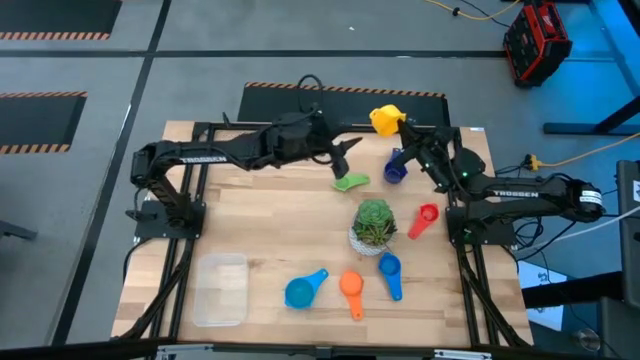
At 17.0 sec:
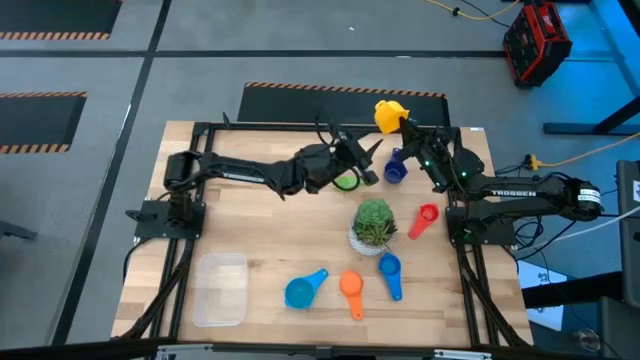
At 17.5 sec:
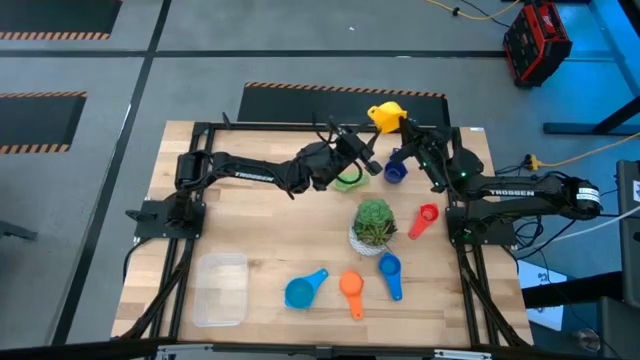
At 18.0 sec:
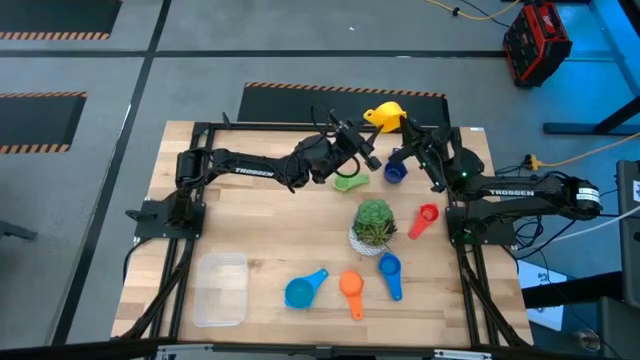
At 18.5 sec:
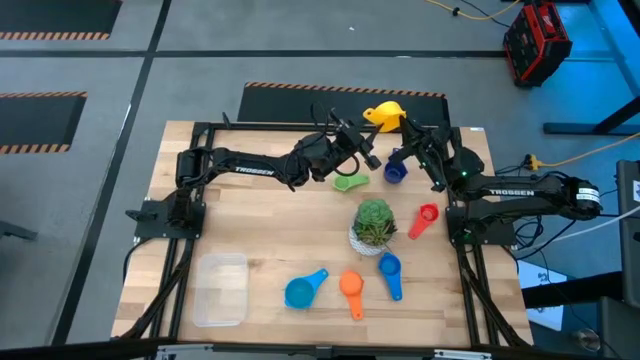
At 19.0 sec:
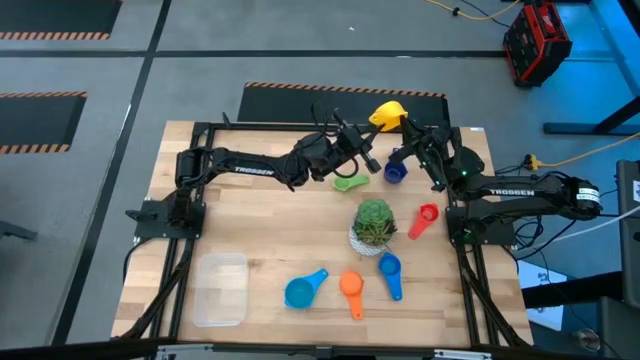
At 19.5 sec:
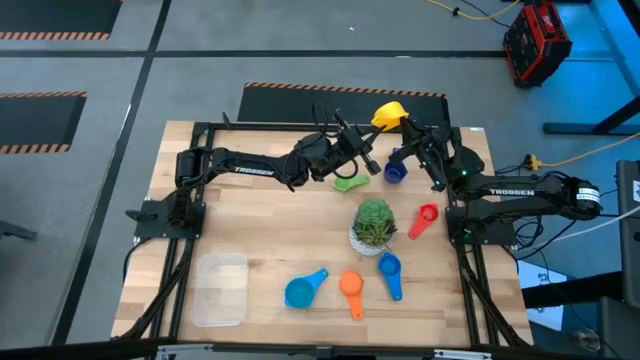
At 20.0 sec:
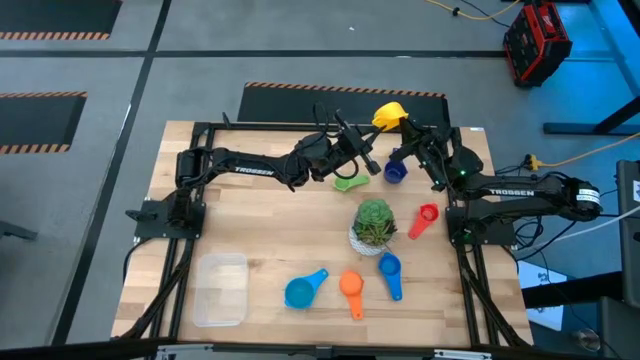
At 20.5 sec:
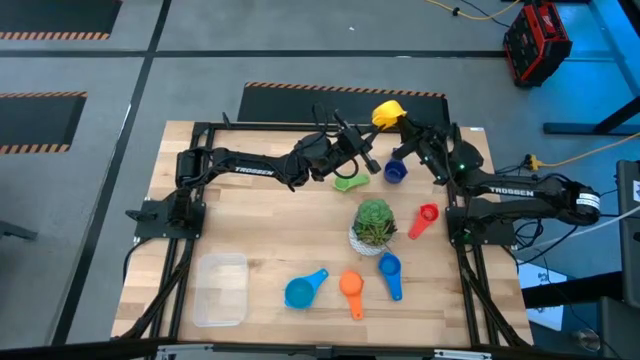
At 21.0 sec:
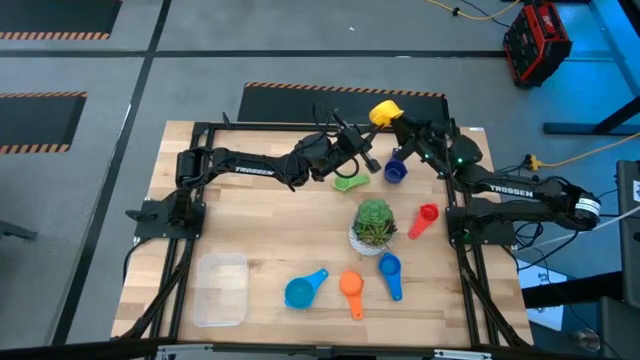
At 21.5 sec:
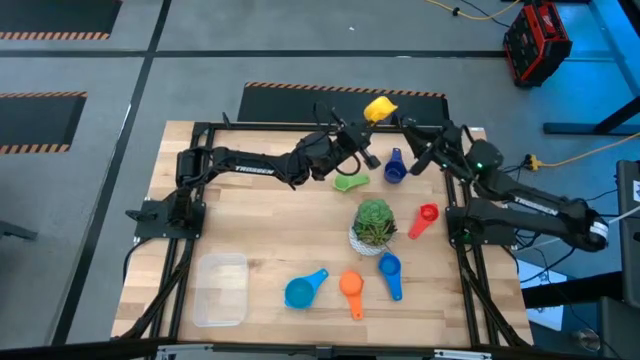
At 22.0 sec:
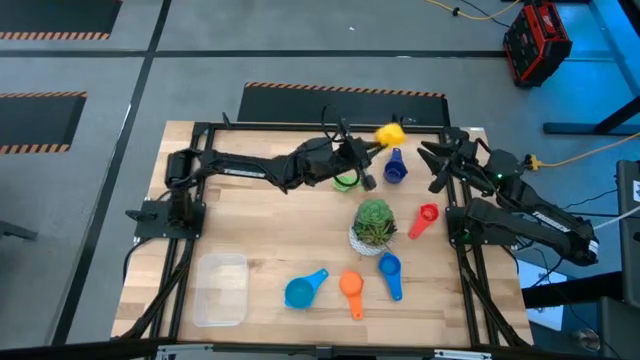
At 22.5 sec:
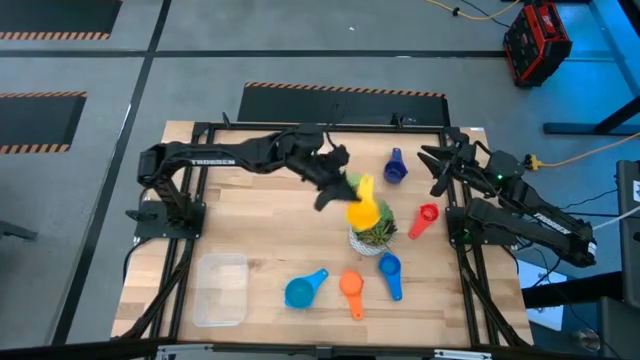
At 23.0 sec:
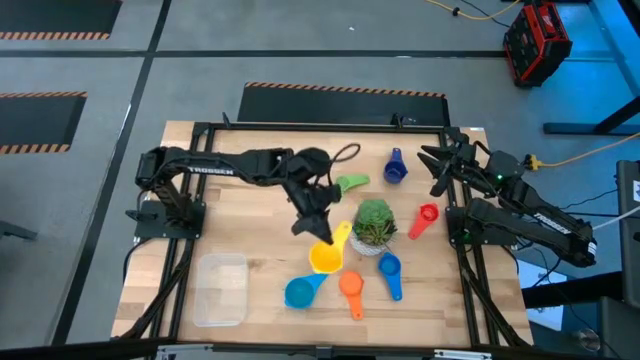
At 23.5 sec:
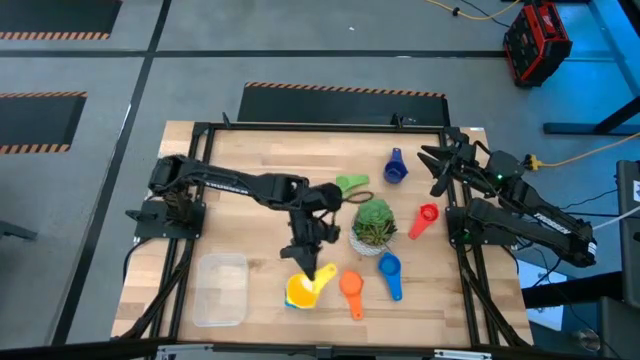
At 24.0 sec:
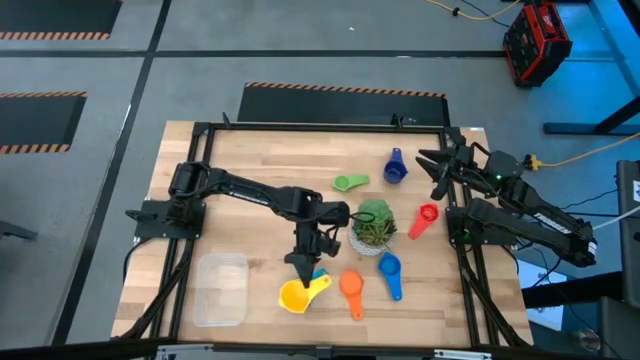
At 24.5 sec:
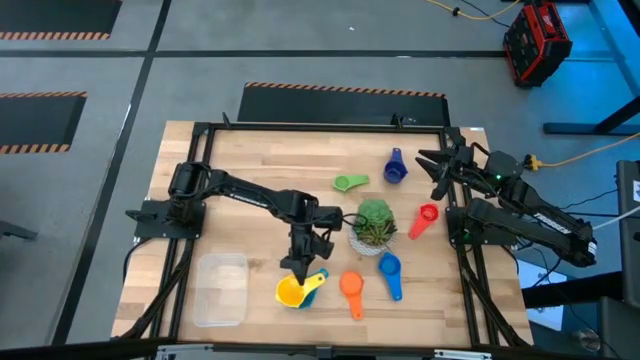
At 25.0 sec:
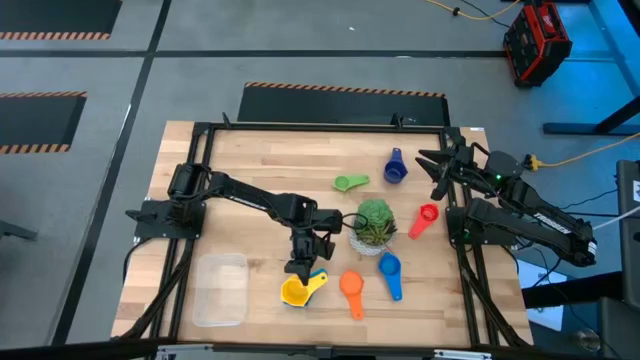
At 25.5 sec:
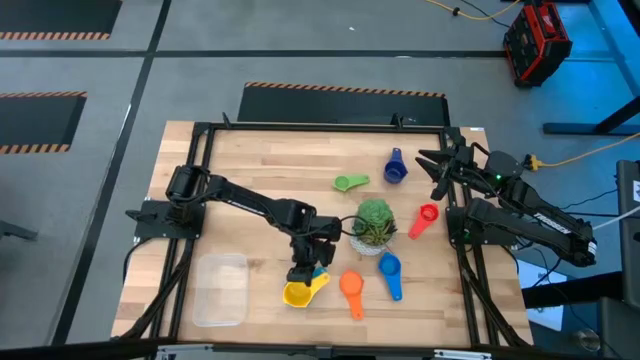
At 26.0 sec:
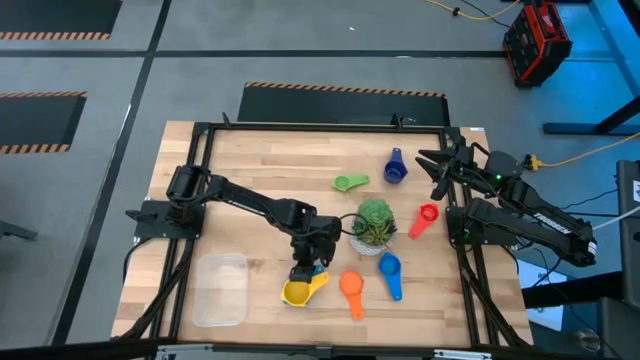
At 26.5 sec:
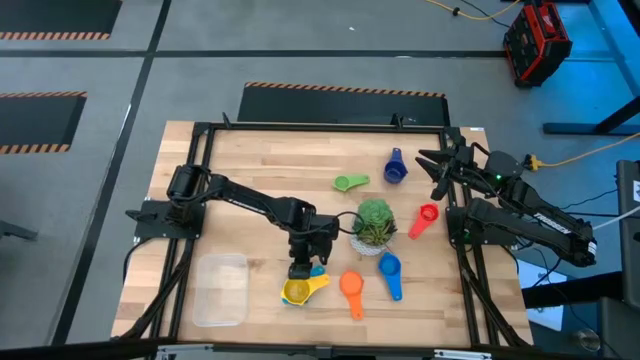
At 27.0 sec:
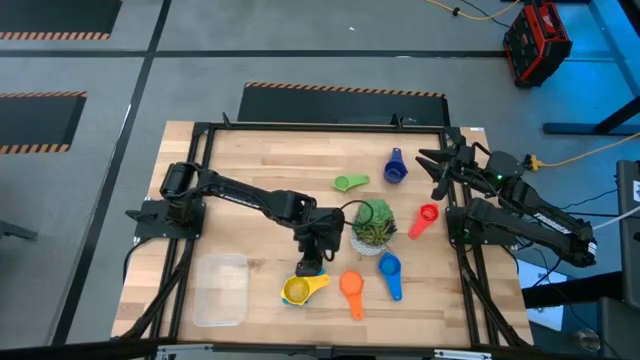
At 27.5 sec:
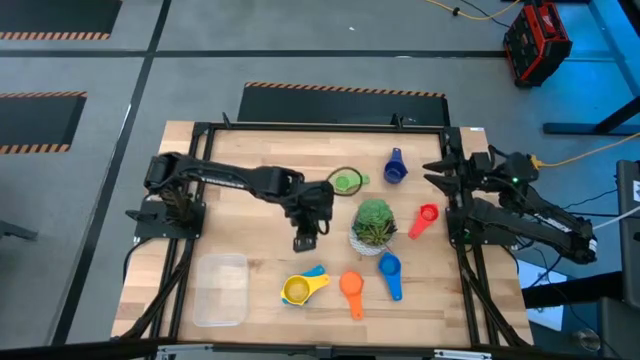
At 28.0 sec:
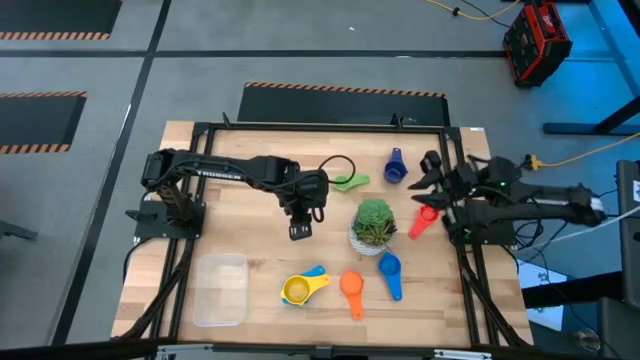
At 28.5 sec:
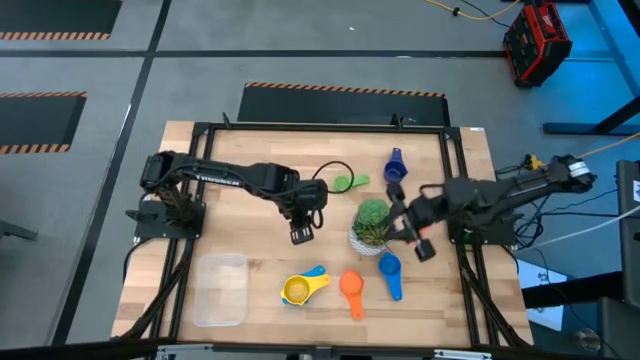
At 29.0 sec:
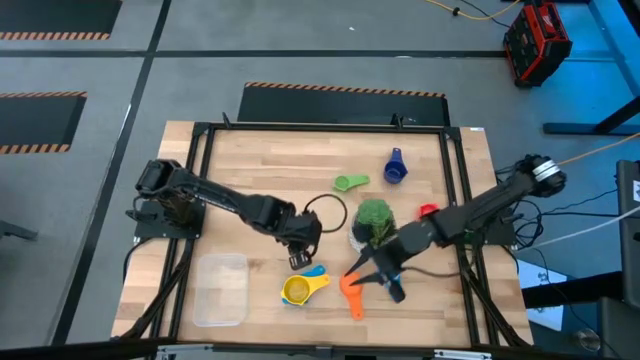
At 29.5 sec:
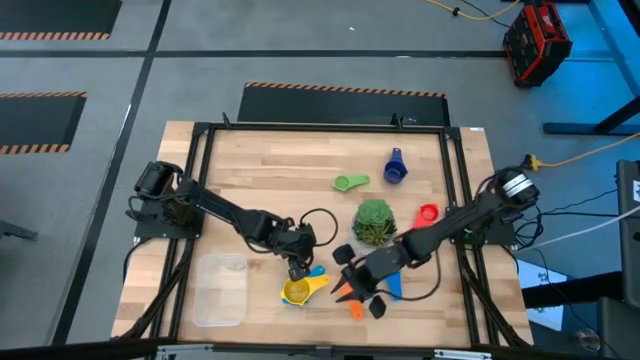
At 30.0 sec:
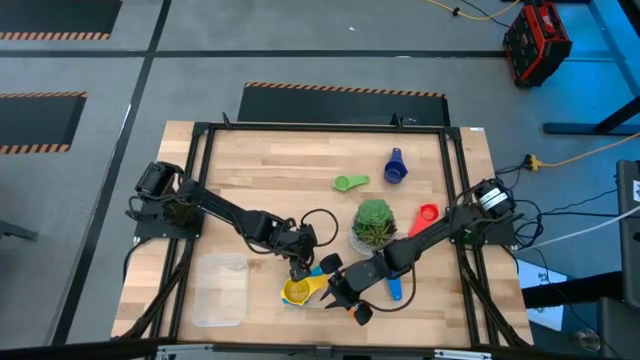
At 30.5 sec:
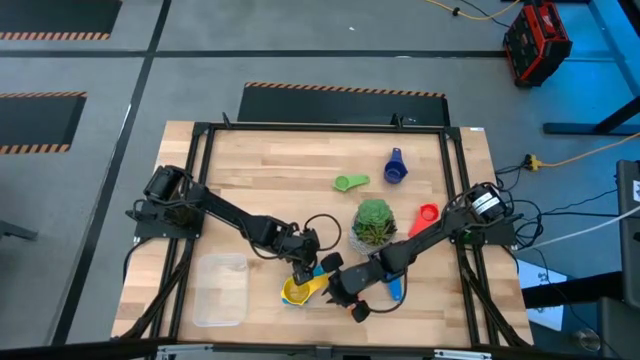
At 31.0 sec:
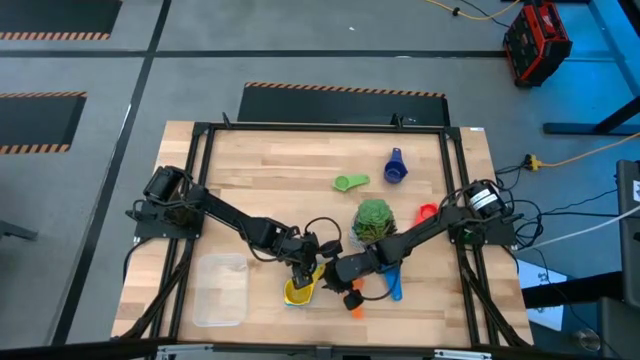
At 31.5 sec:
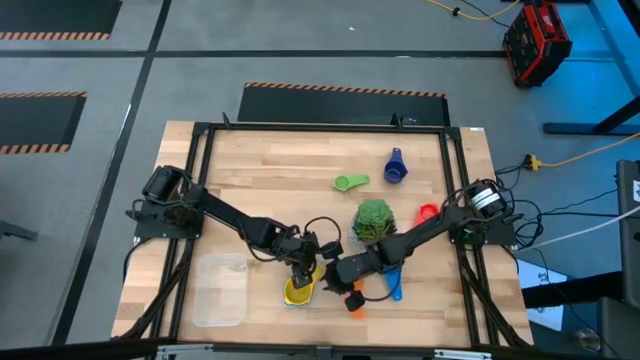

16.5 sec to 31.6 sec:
Task: Nest measuring cups in basket
Stack the yellow measuring cup on top of the light blue measuring cup

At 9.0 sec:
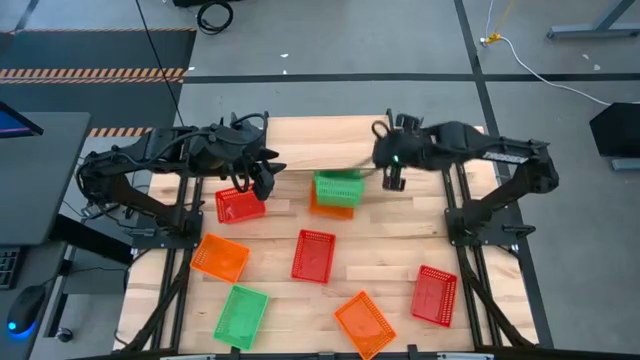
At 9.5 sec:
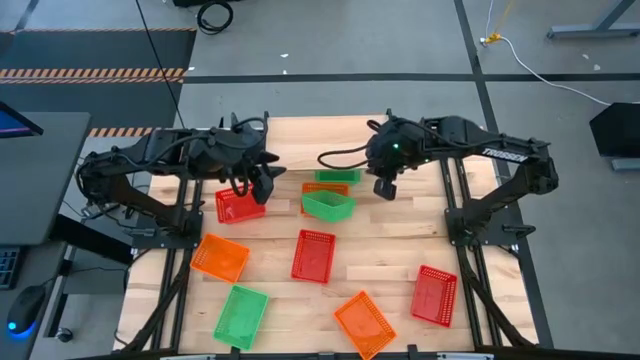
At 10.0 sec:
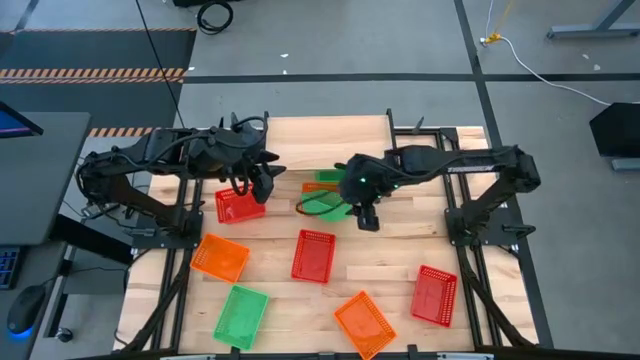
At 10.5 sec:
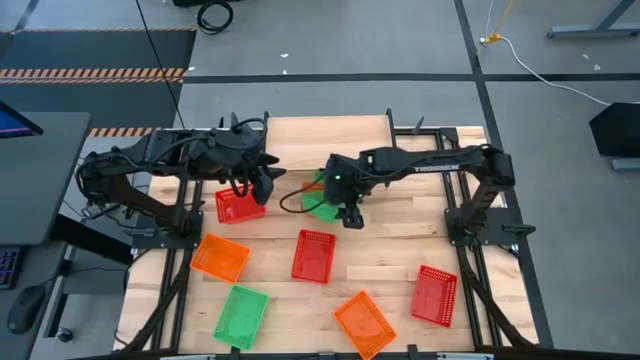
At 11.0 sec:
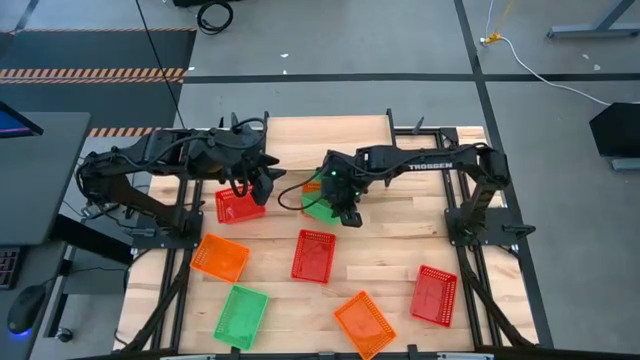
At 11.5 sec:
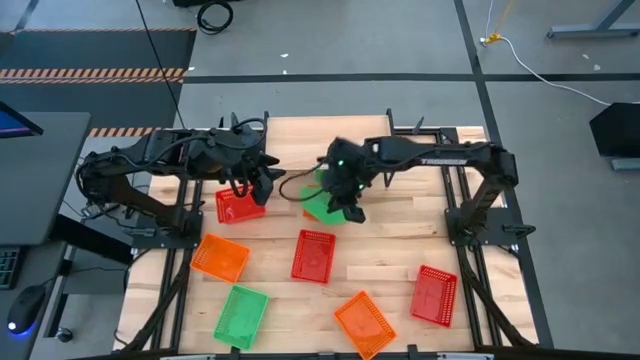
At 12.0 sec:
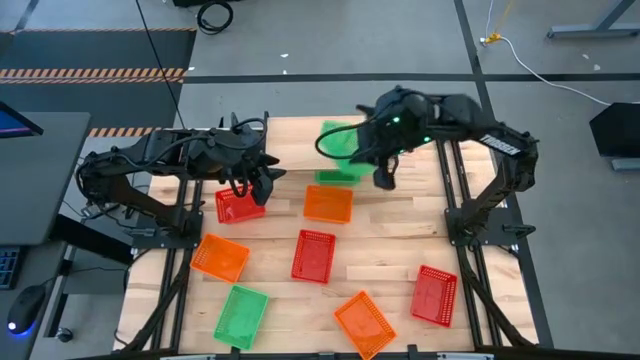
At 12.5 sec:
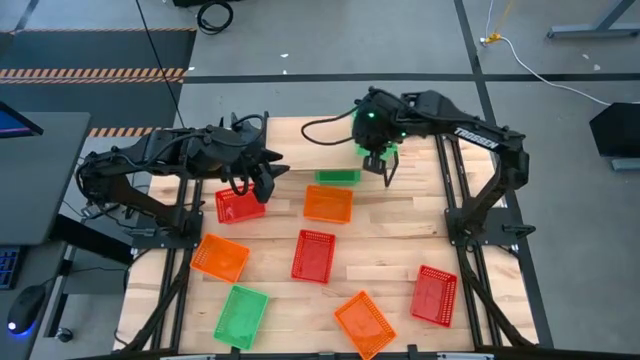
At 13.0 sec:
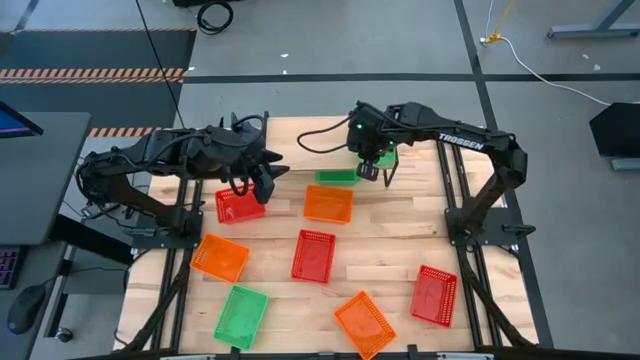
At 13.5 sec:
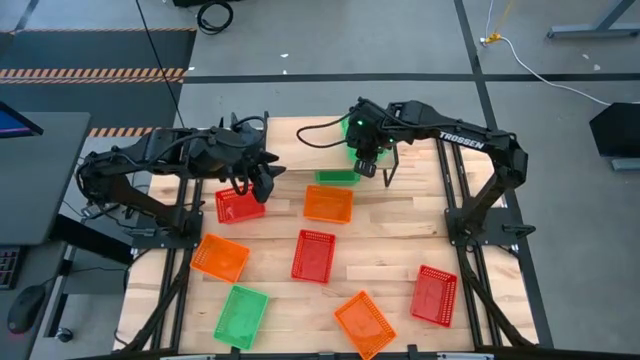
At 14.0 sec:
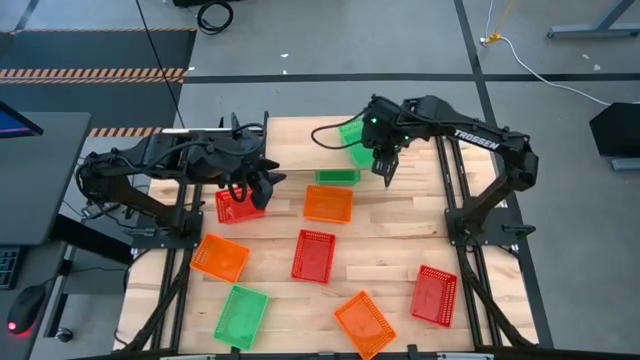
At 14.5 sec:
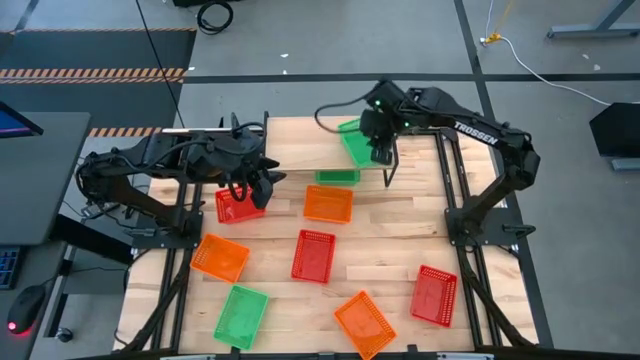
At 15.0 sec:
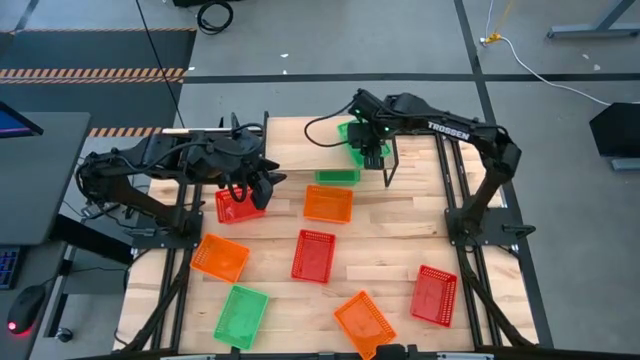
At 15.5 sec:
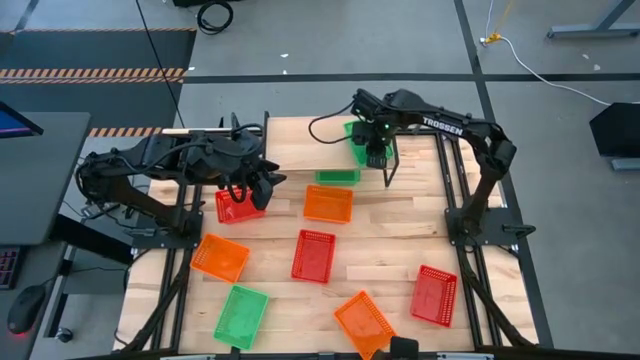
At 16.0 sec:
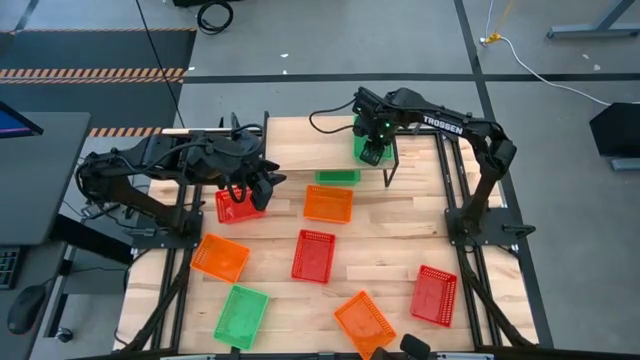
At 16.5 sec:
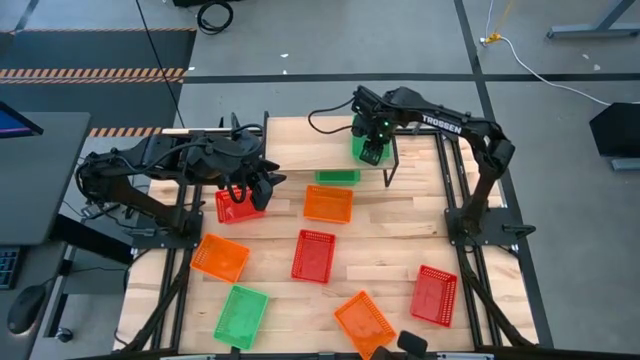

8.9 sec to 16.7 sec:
Task: Stack baskets on shelf by color
Put the middle green bin on the shelf
